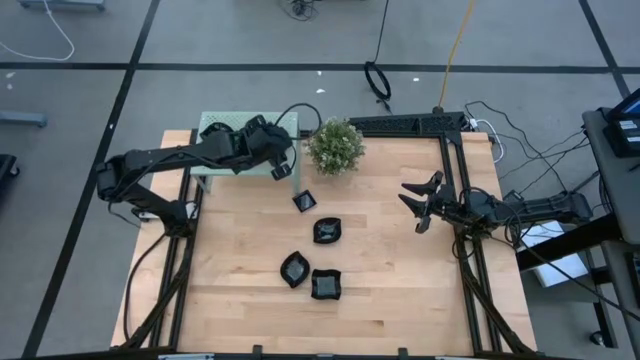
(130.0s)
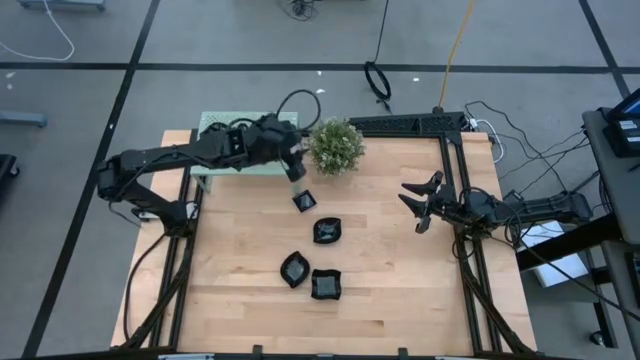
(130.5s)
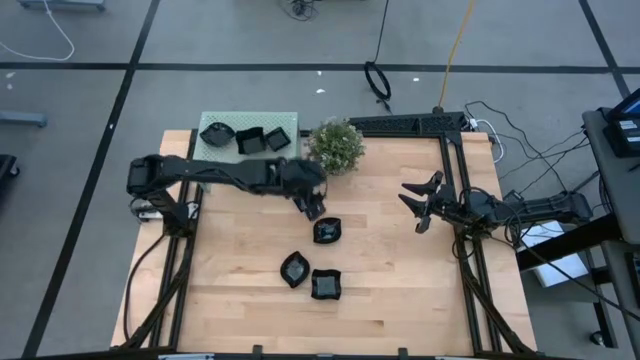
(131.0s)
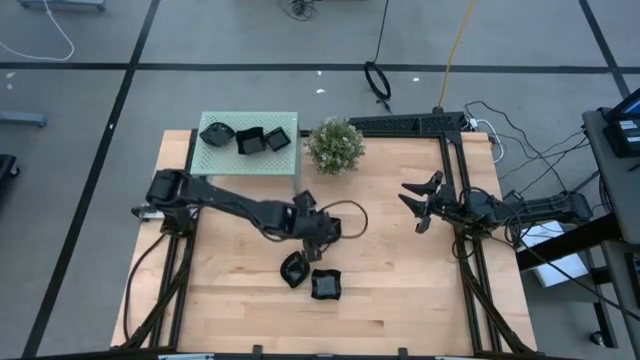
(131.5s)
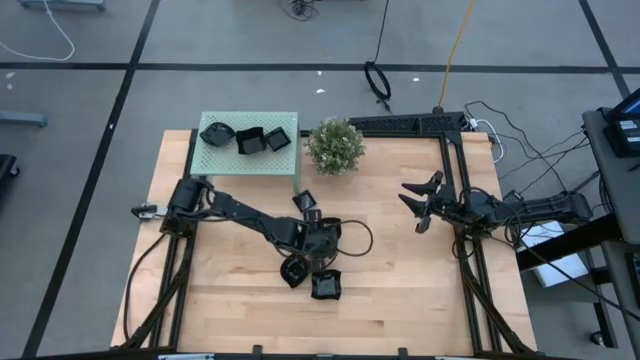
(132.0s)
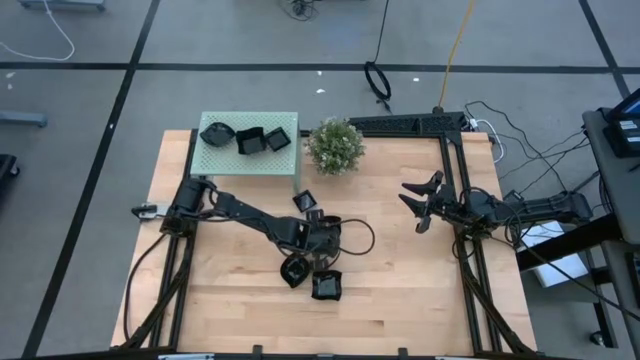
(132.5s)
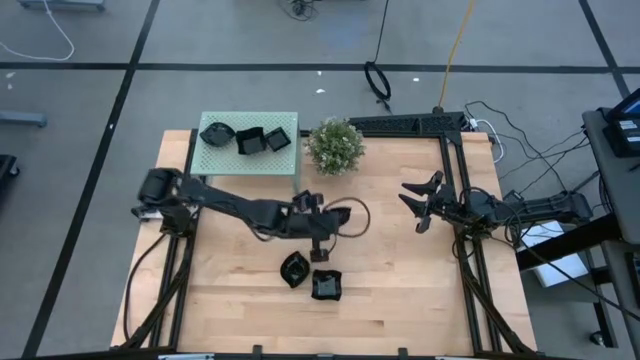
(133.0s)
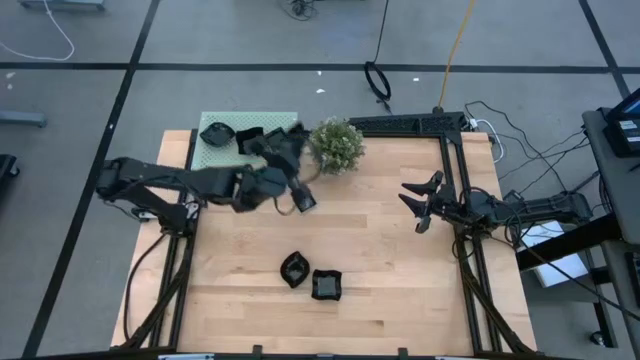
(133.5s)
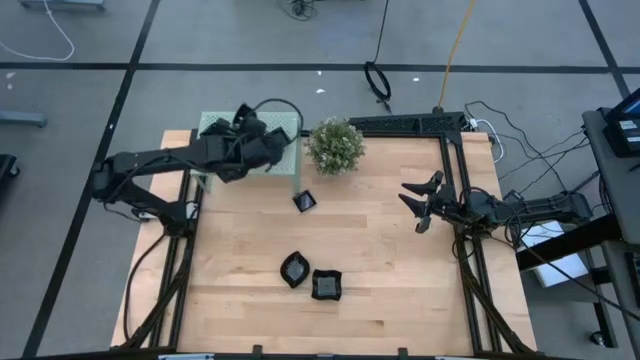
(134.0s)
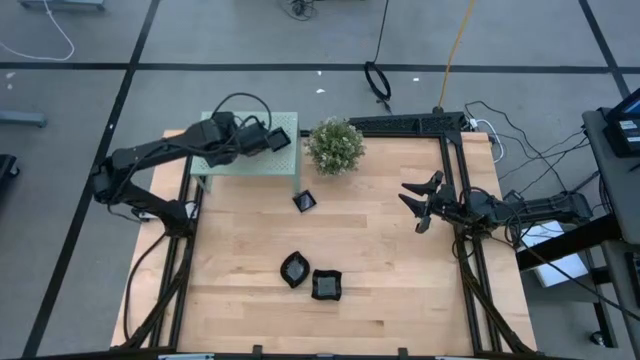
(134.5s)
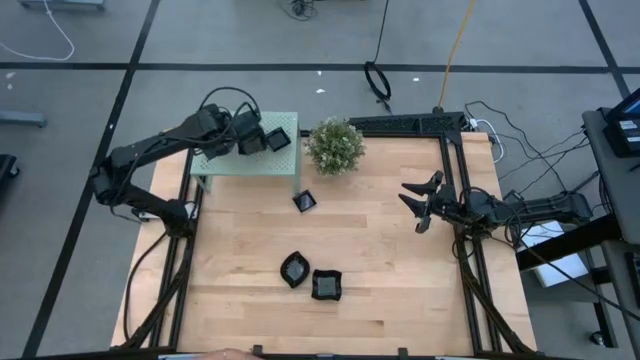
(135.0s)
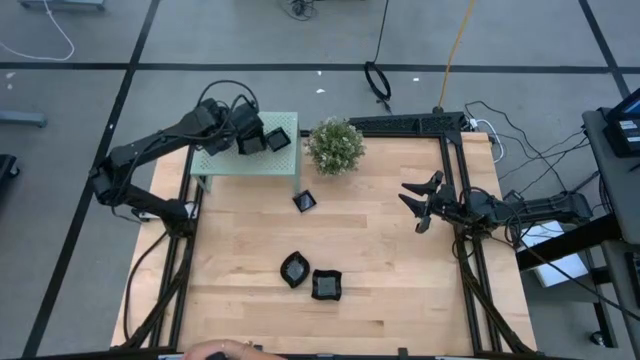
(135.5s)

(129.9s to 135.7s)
Task: Pick & Place Mini shaped plates
Stack the leaf shape plate on top of the leaf shape plate on the shelf

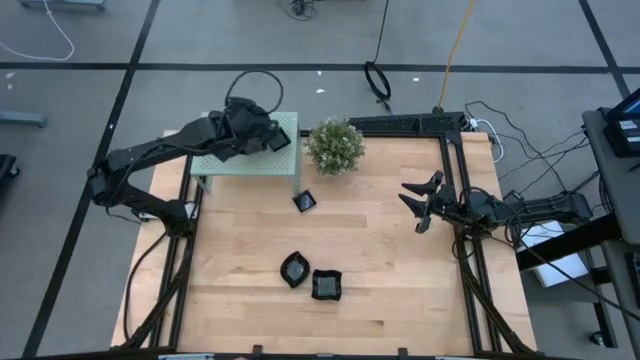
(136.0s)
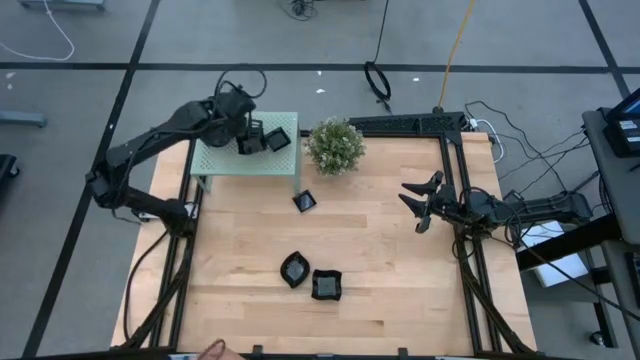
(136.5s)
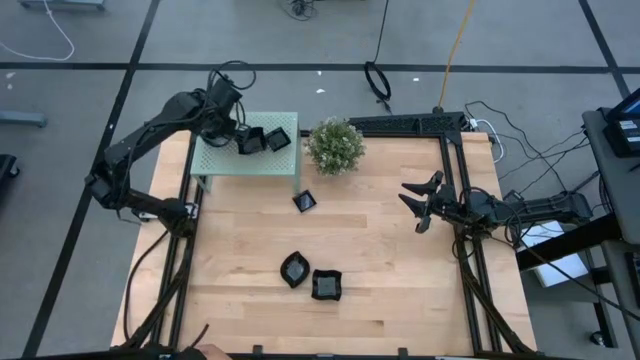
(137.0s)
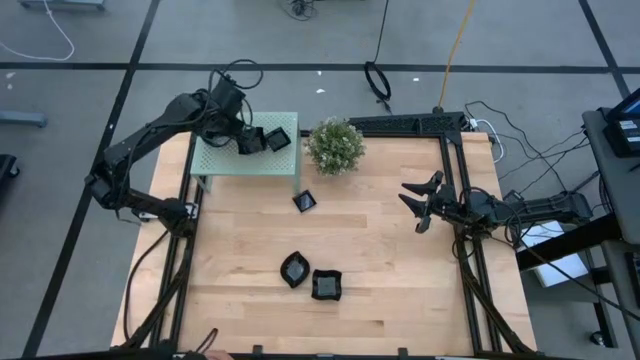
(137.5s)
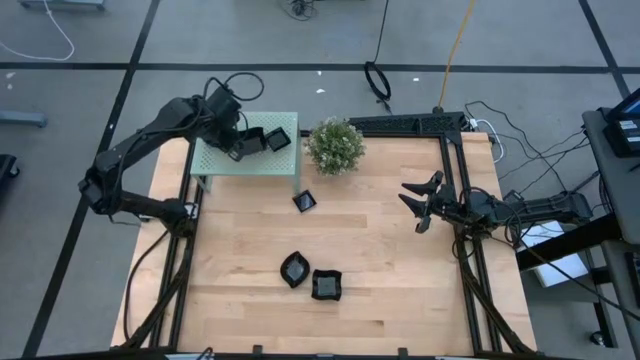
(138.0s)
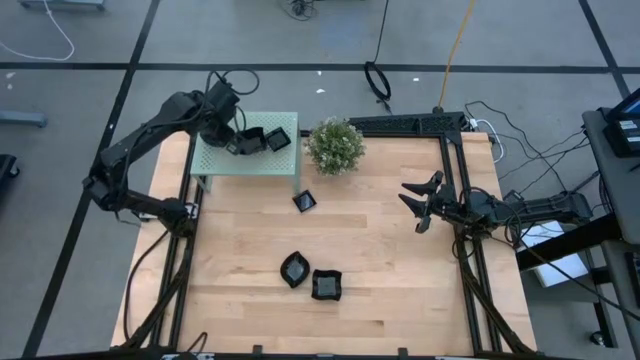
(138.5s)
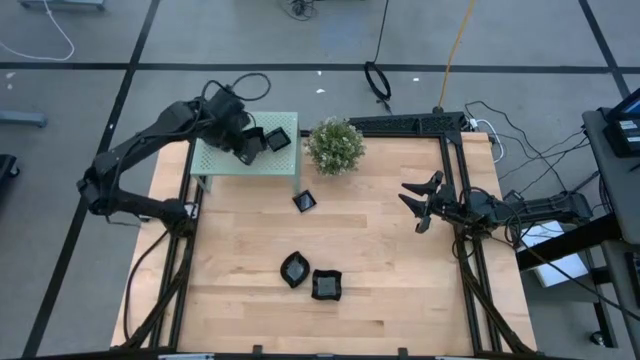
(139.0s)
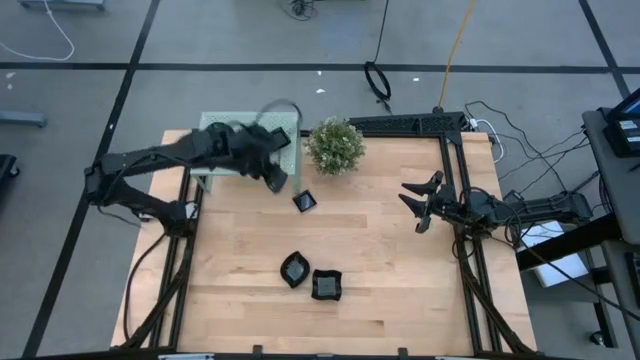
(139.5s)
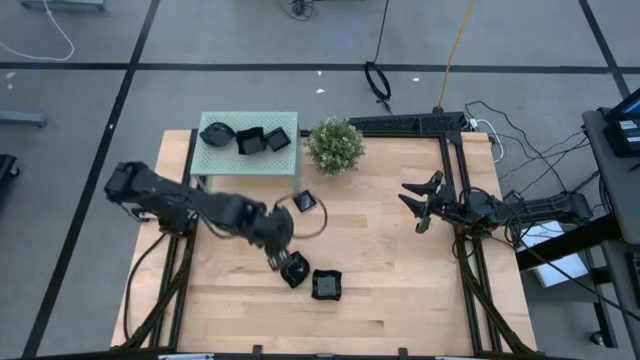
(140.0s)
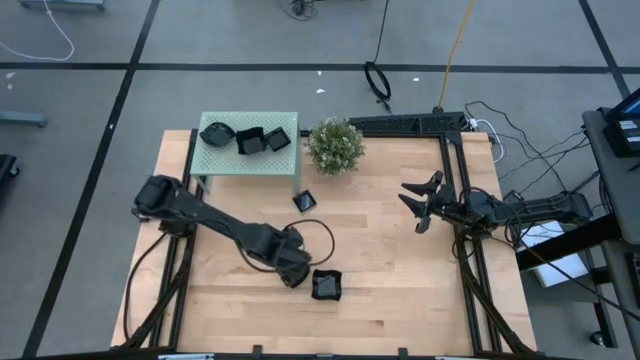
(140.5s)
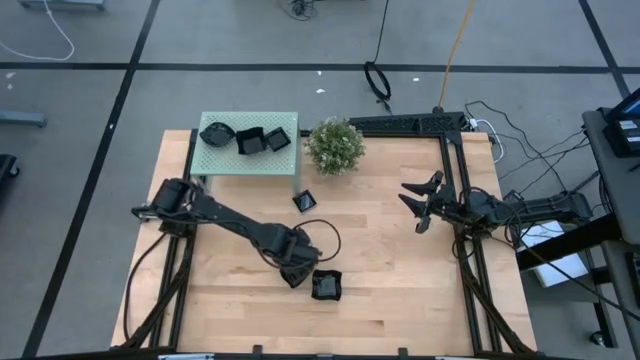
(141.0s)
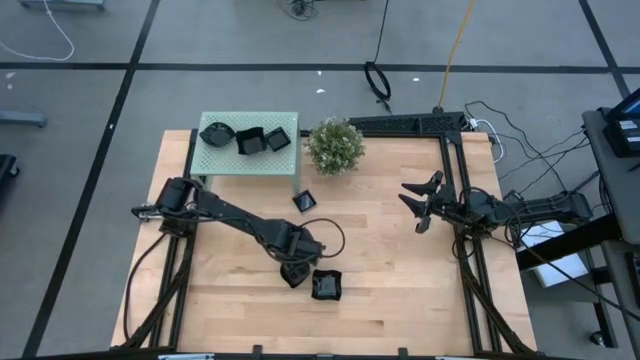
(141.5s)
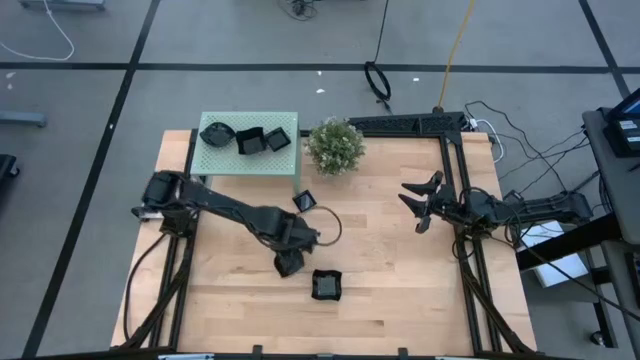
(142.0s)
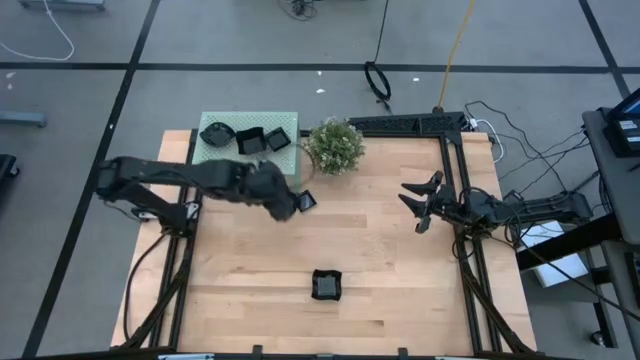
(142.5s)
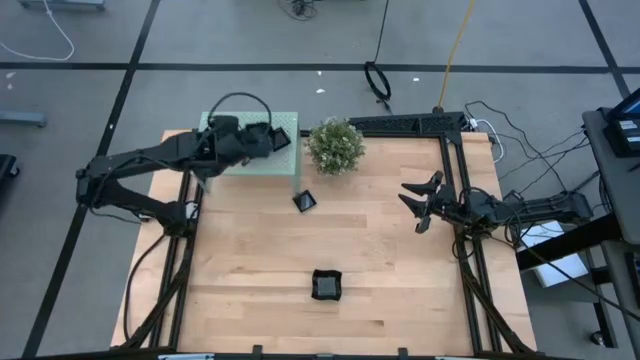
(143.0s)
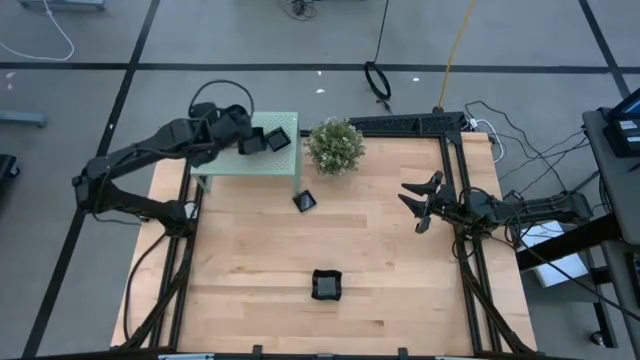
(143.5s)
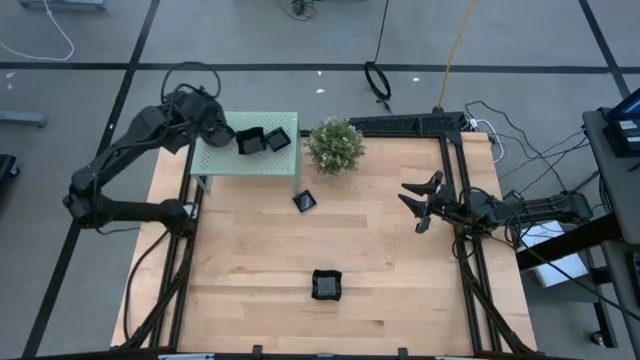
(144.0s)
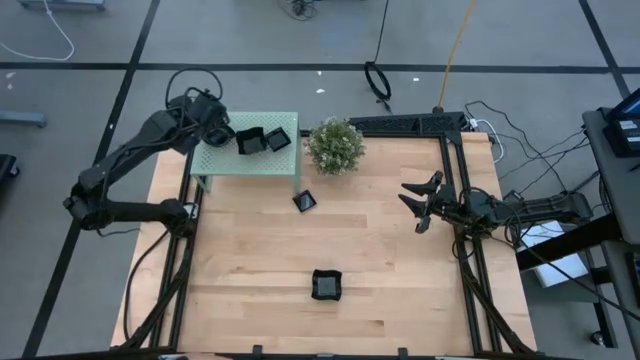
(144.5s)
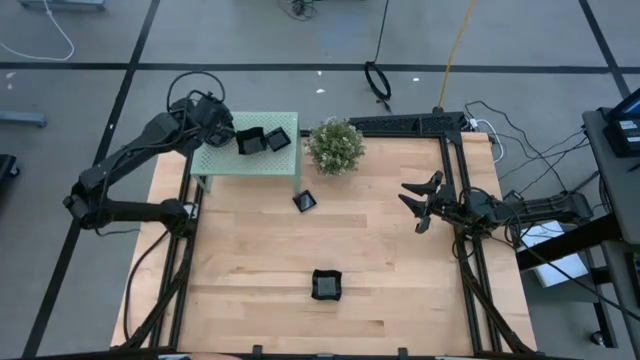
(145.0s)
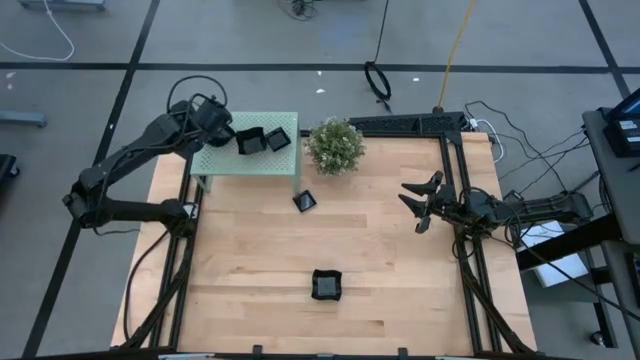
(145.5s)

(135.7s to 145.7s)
Stack the leaf shape plate on top of the leaf shape plate on the shelf

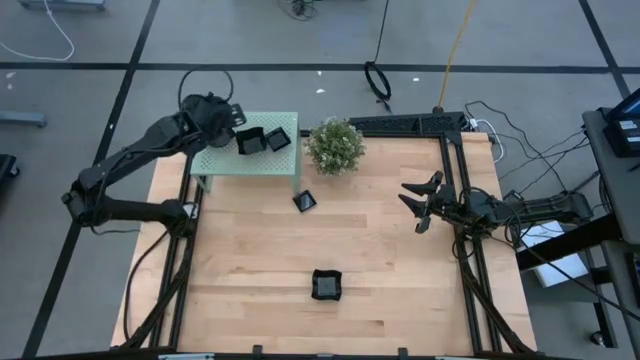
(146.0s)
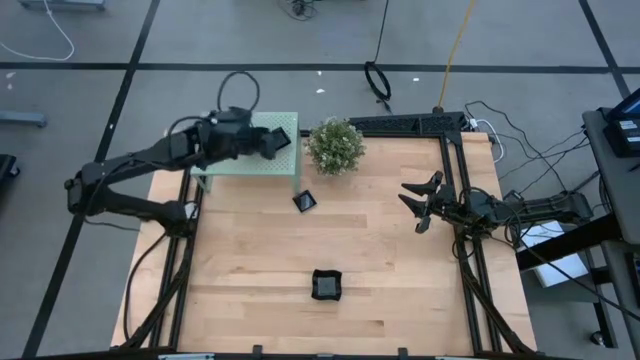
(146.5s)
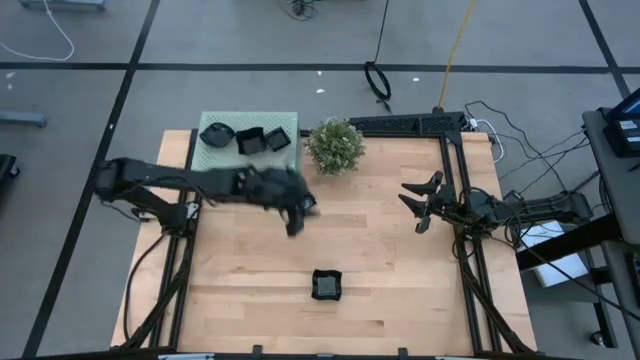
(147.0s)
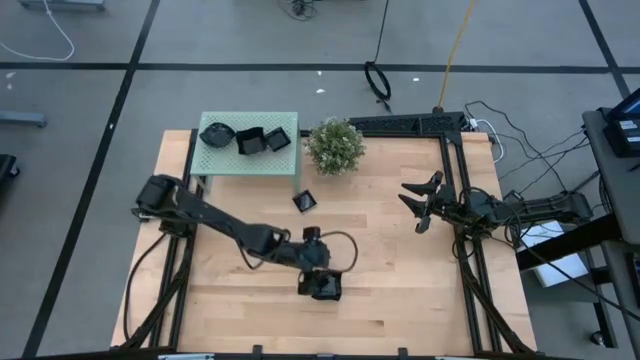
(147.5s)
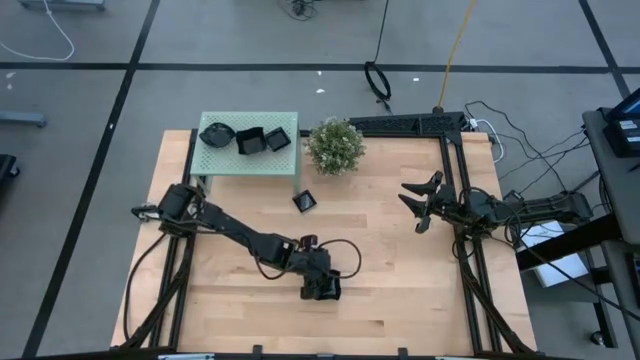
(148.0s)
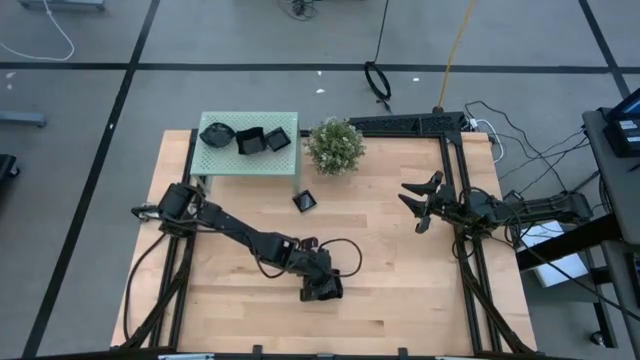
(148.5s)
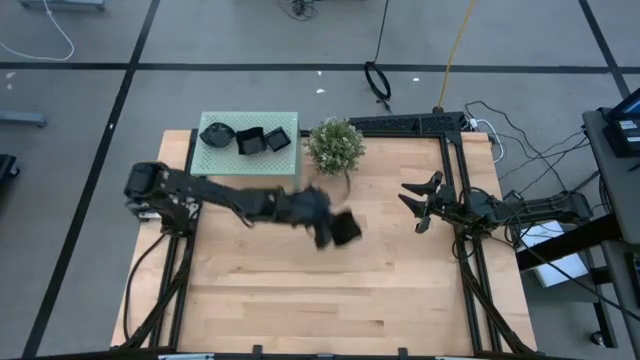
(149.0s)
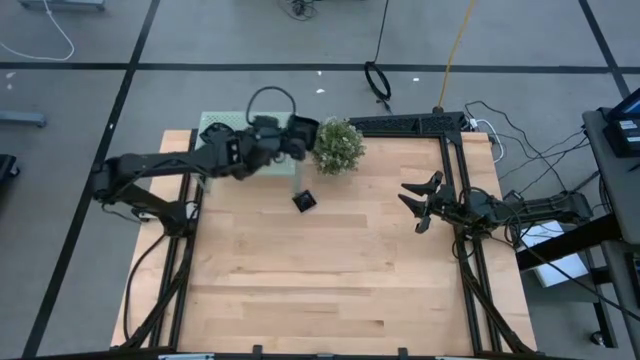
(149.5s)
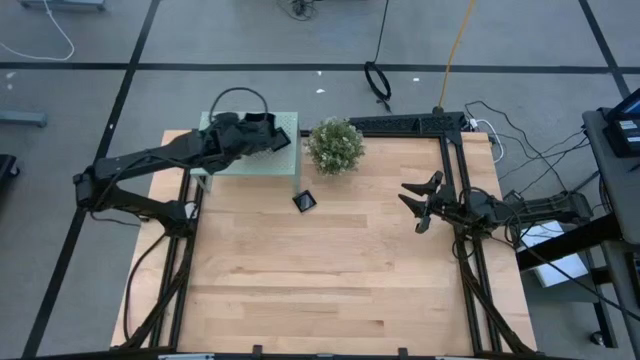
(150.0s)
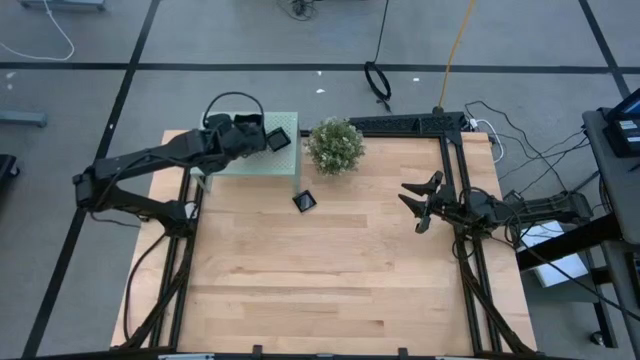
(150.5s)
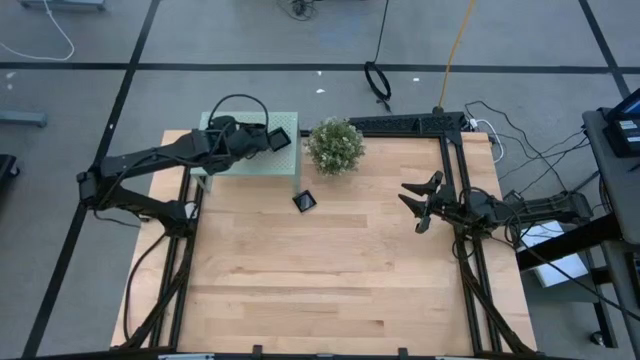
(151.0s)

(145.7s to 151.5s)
Stack the distorted square plate on top of the distorted square plate on the shelf
